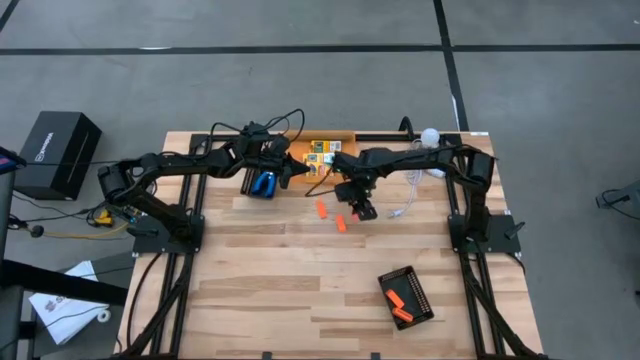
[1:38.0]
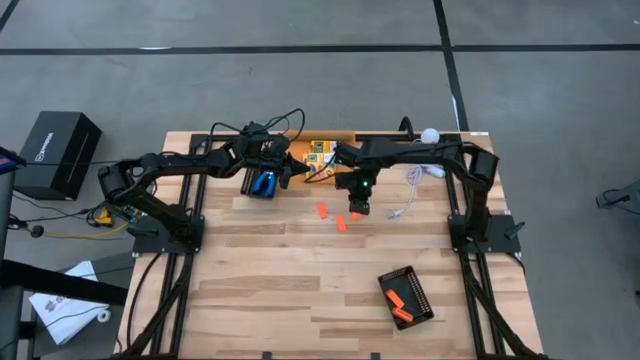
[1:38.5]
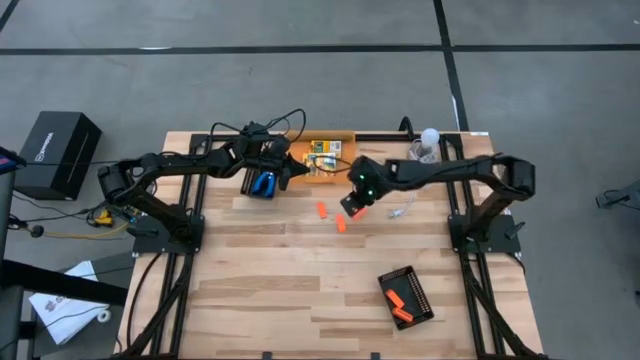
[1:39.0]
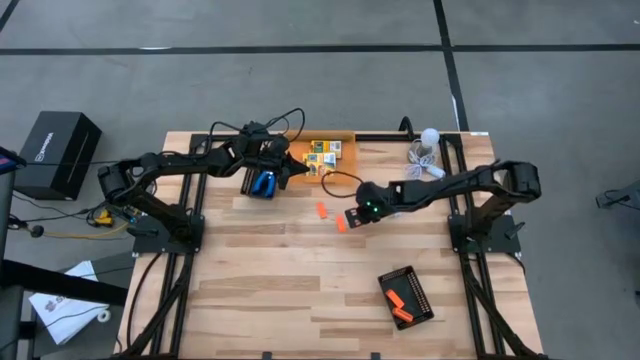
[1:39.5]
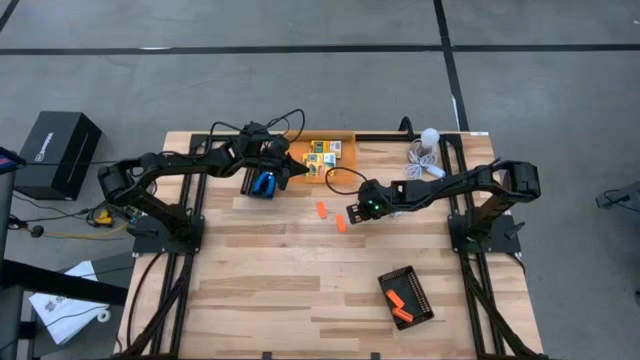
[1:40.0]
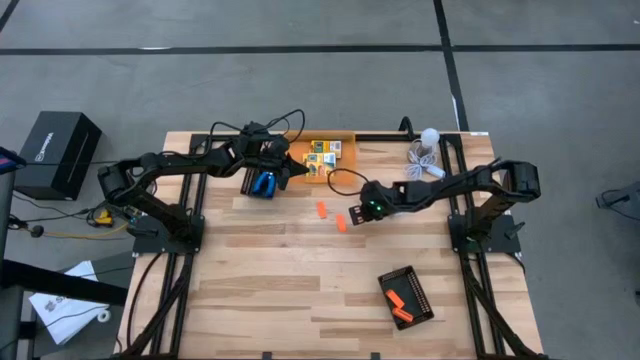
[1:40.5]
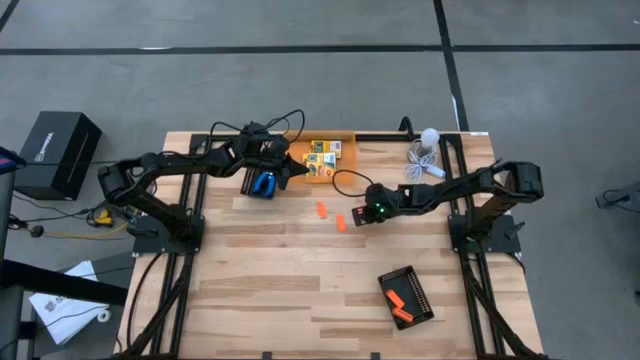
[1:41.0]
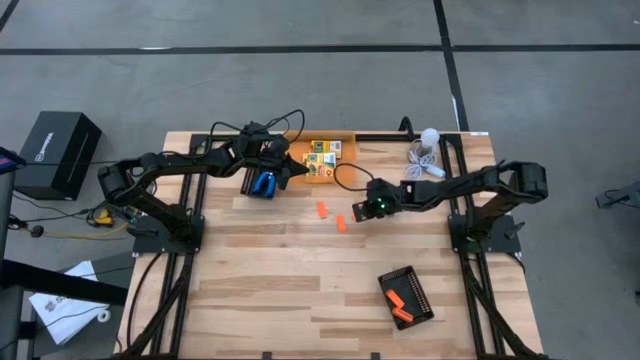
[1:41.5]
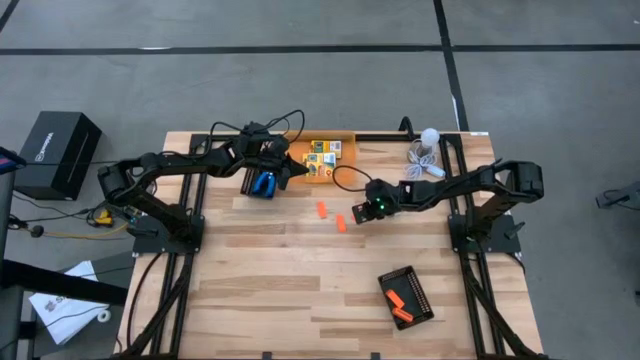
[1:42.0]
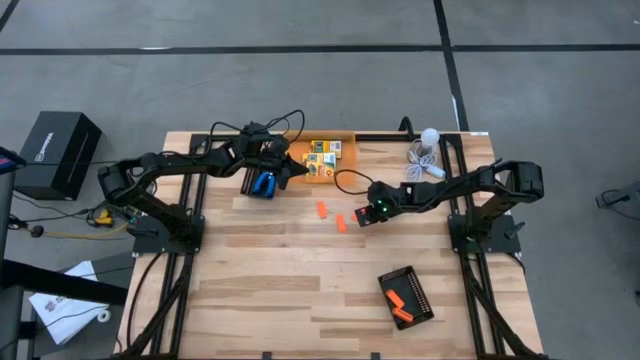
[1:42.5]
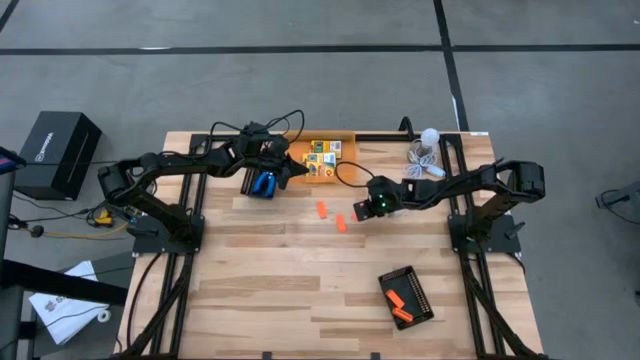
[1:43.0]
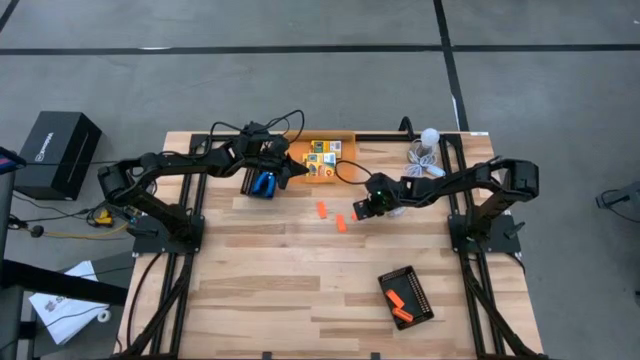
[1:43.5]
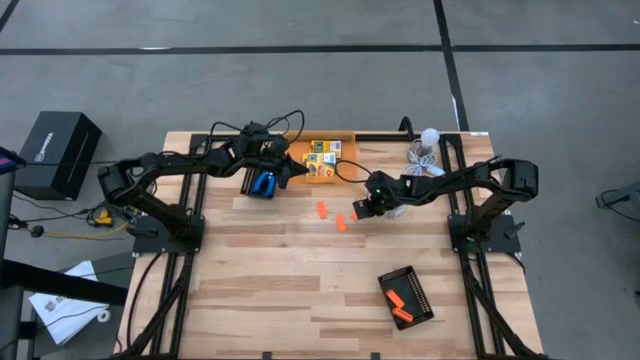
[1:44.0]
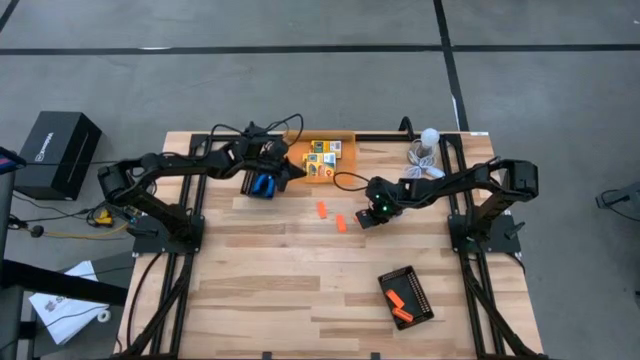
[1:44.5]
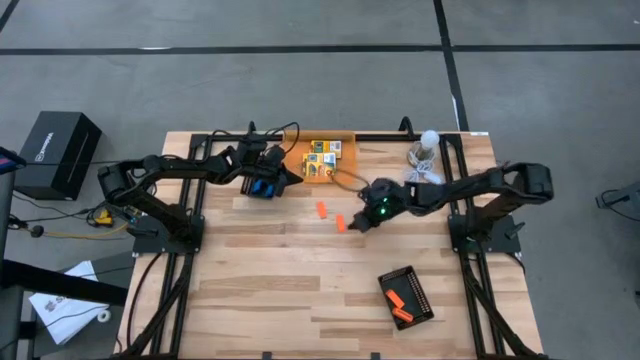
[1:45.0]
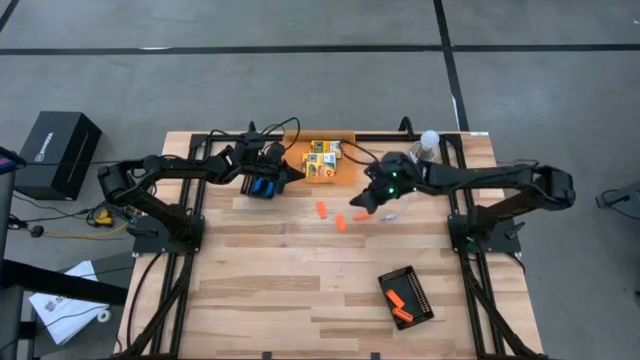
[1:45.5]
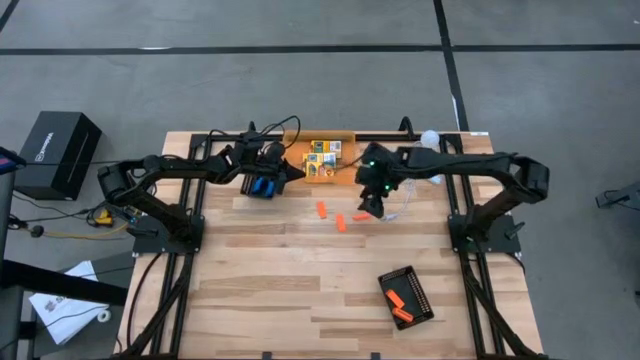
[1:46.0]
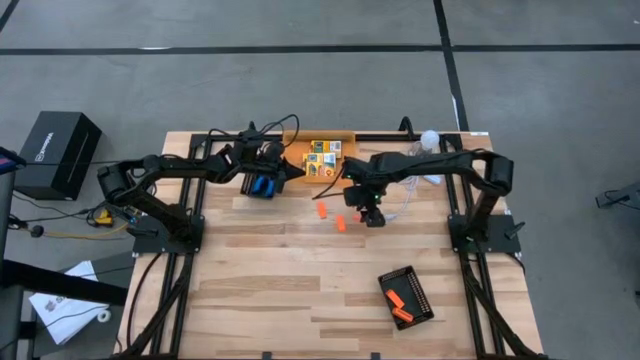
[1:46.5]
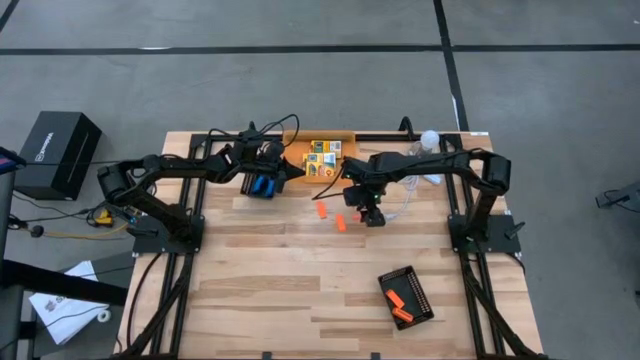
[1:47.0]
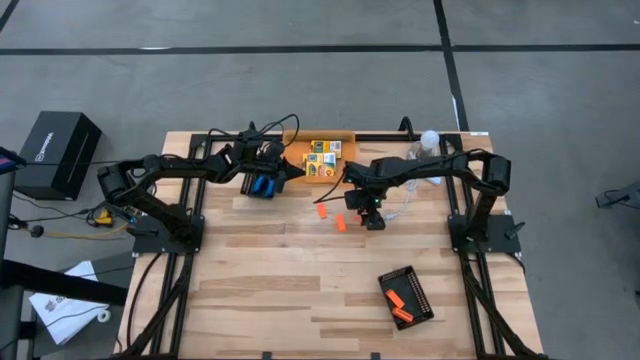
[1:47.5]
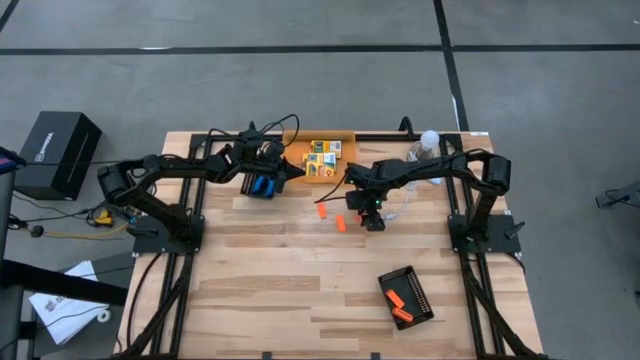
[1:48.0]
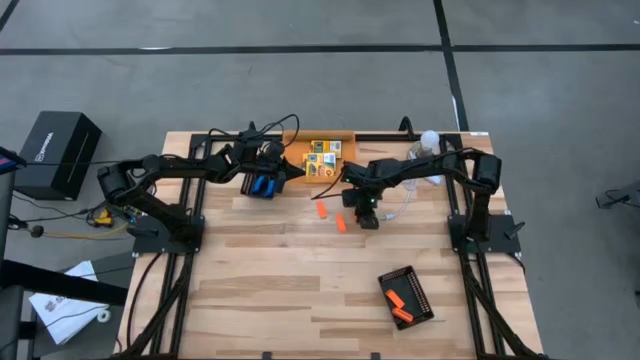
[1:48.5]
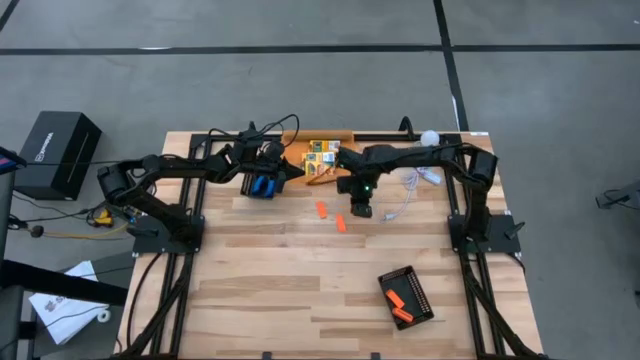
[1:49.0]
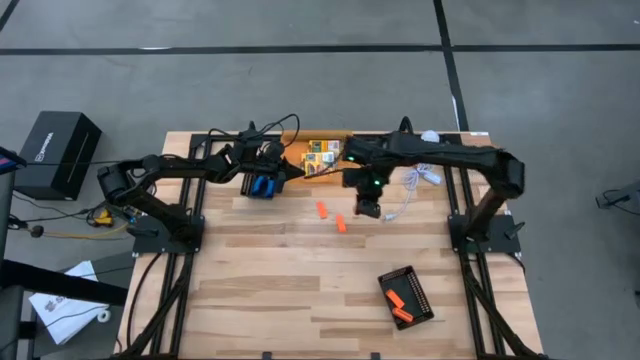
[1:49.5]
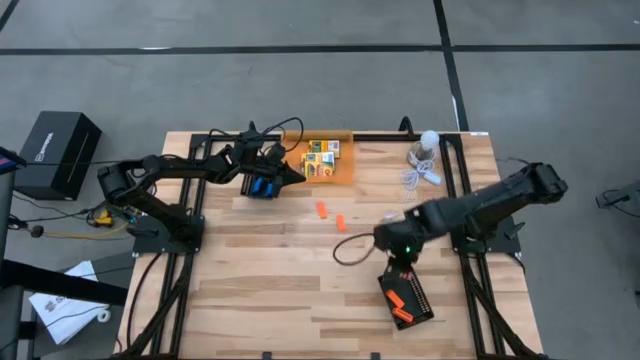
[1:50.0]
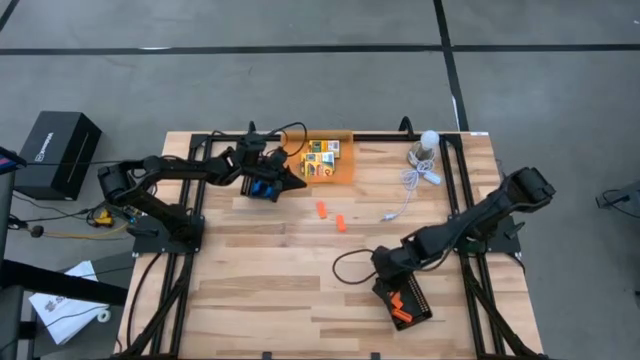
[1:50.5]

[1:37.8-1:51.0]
Task: Pick & Place School Supplies
Put the orange eraser into the bottom black bin

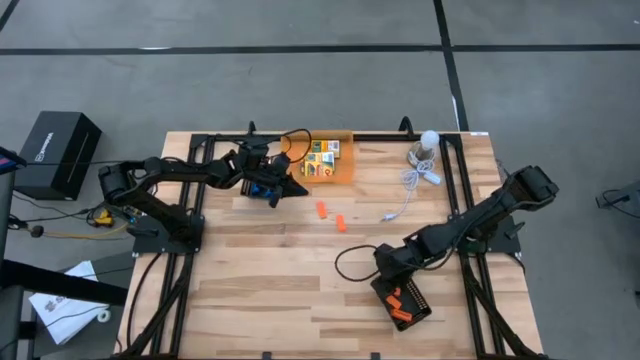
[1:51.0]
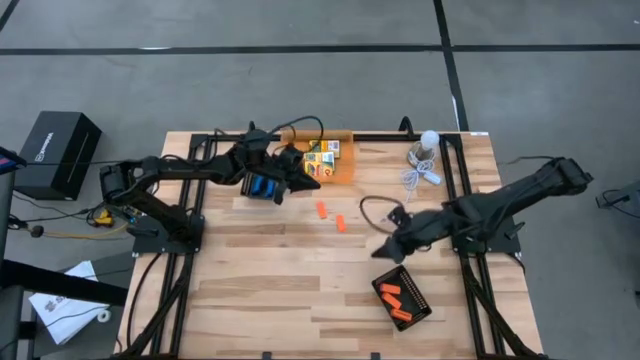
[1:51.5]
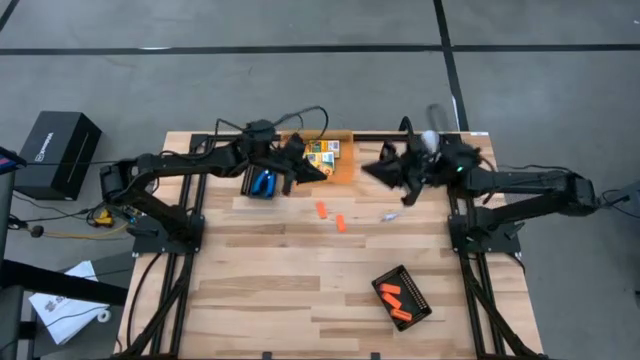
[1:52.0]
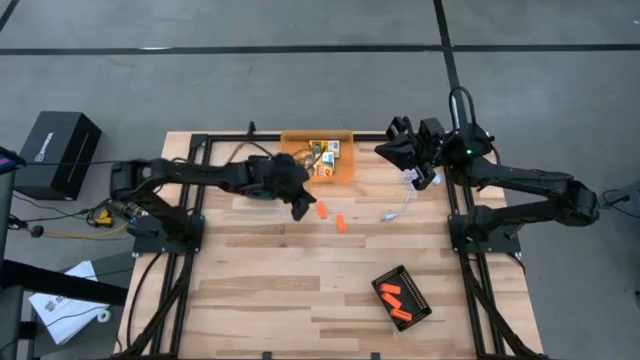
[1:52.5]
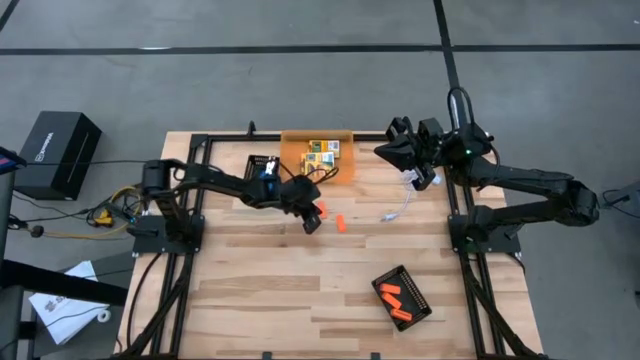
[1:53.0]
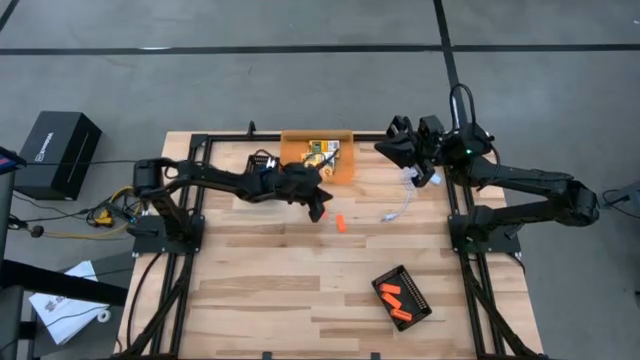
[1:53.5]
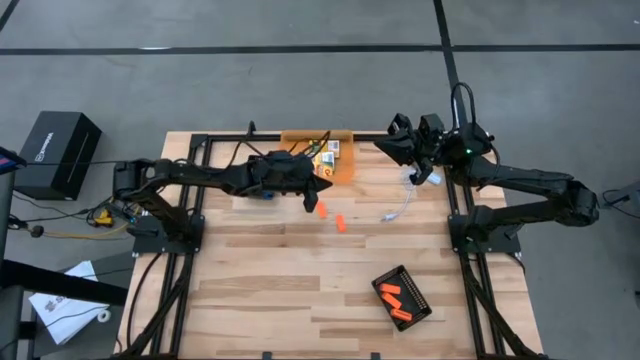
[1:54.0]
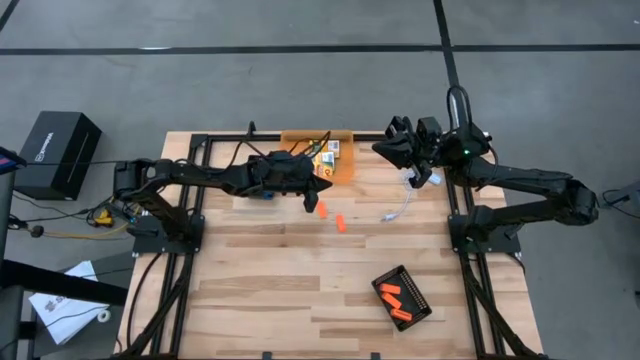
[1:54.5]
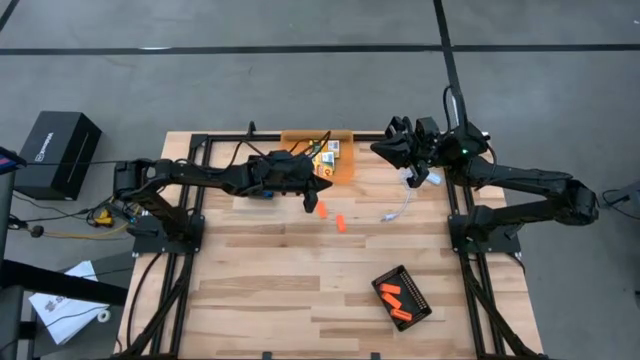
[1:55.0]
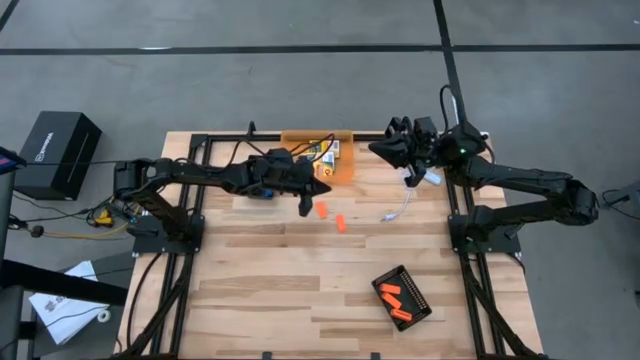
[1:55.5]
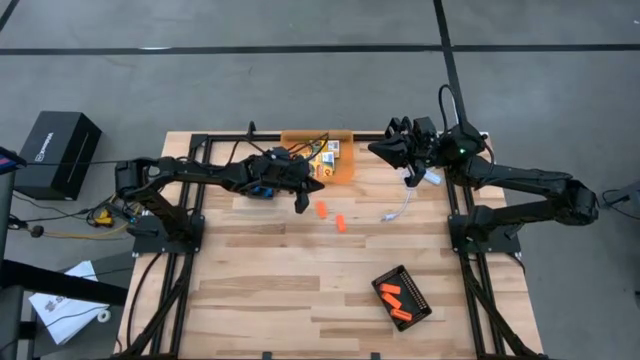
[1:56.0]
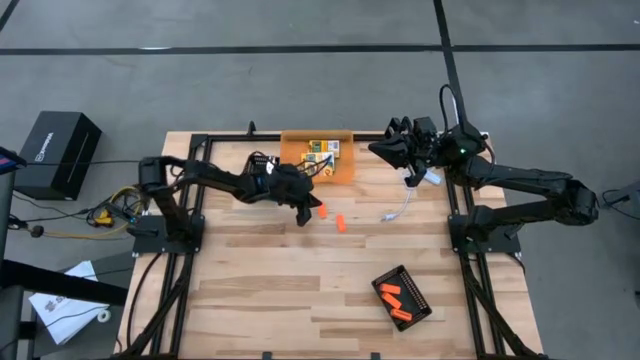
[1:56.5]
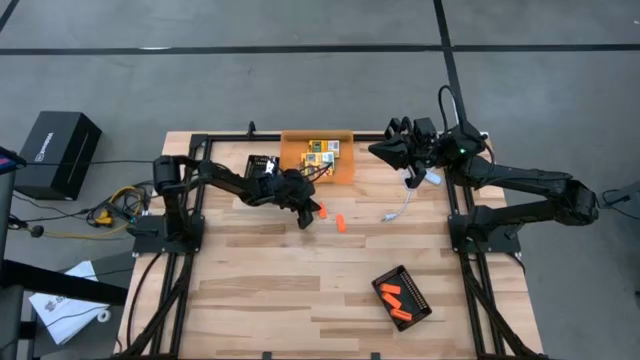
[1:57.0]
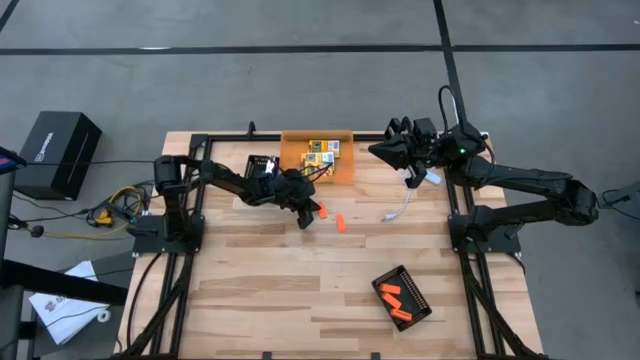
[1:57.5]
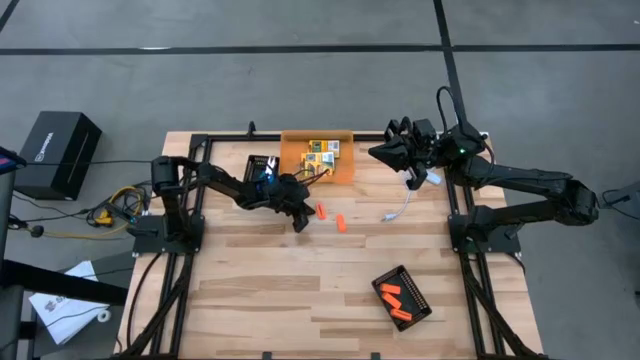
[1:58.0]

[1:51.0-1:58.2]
Put the orange eraser into the bottom black bin
